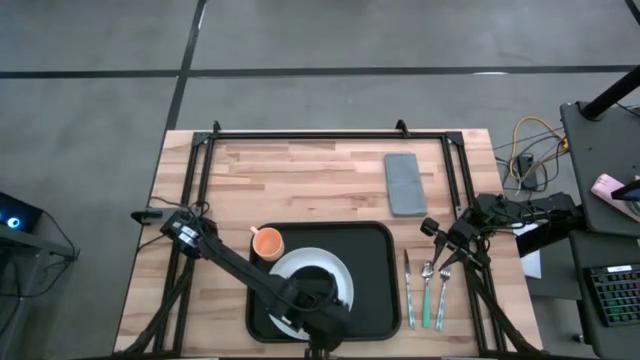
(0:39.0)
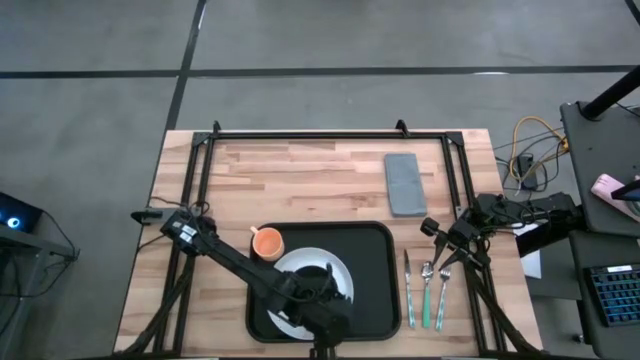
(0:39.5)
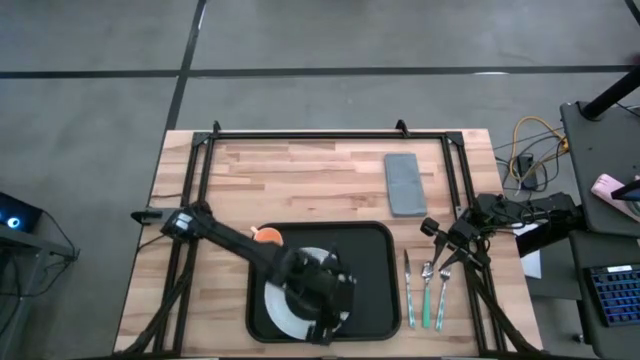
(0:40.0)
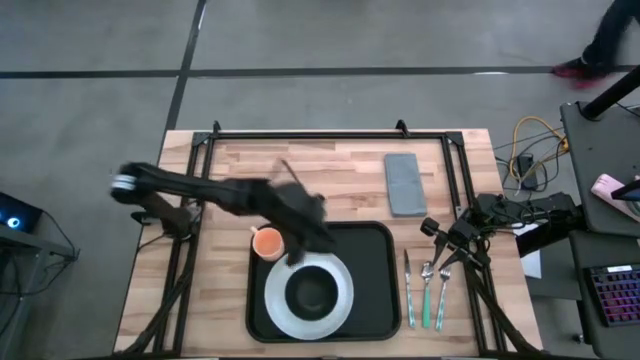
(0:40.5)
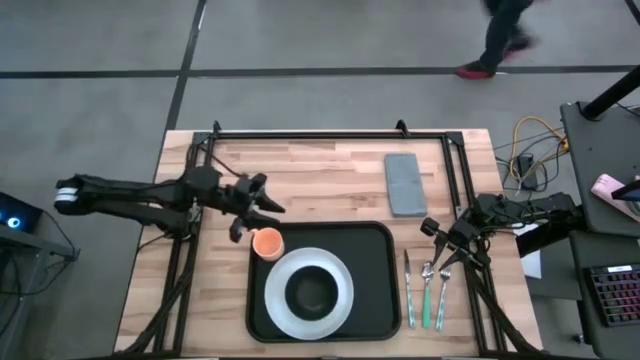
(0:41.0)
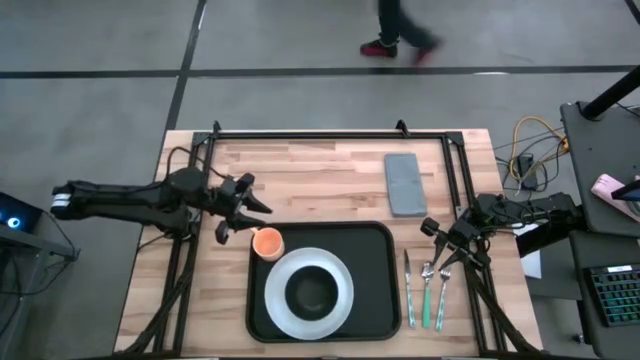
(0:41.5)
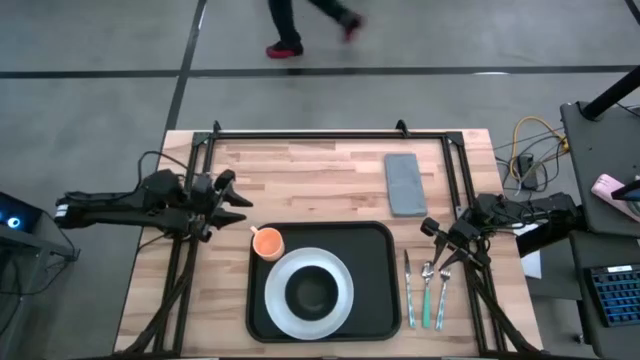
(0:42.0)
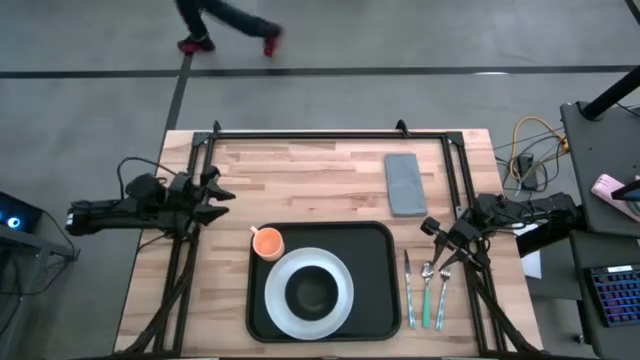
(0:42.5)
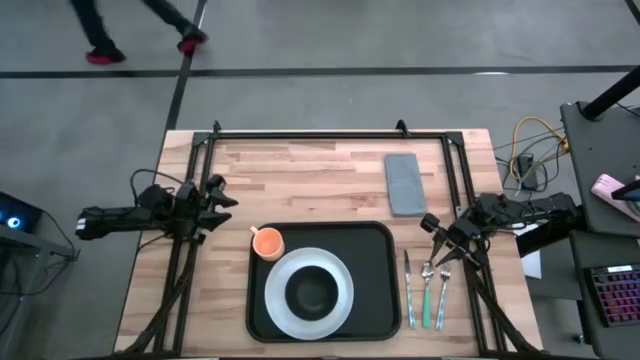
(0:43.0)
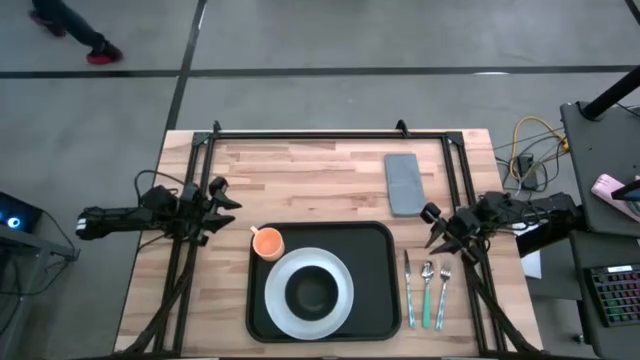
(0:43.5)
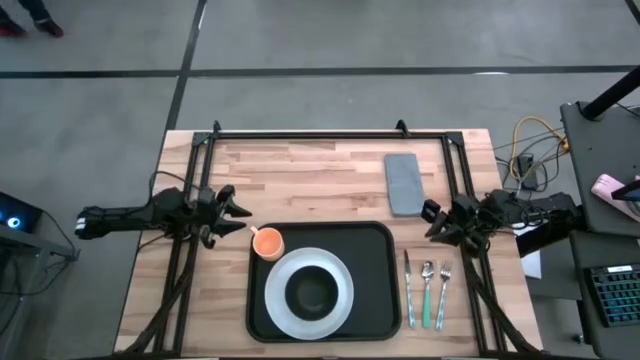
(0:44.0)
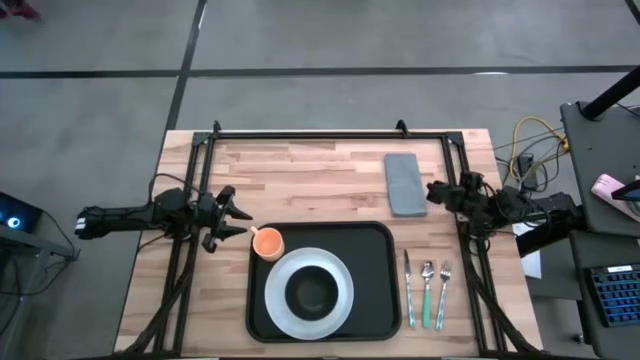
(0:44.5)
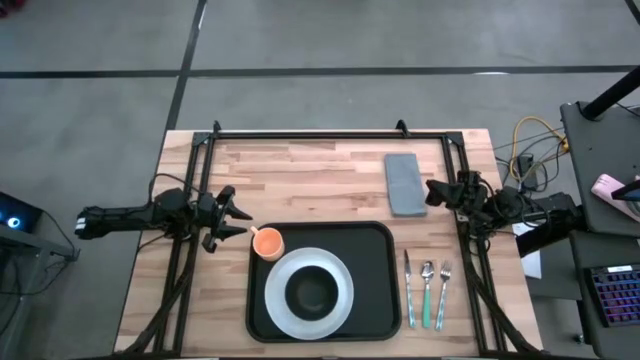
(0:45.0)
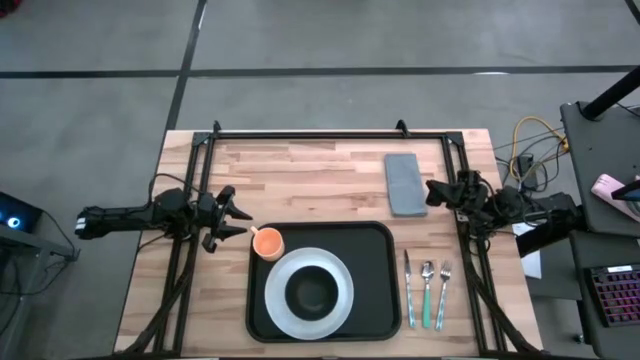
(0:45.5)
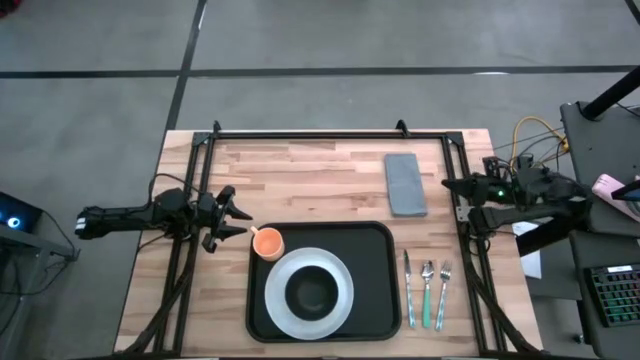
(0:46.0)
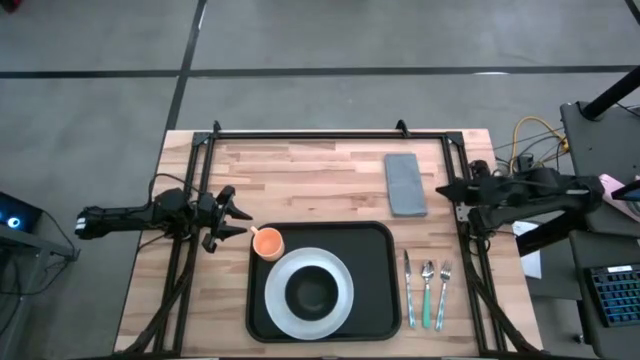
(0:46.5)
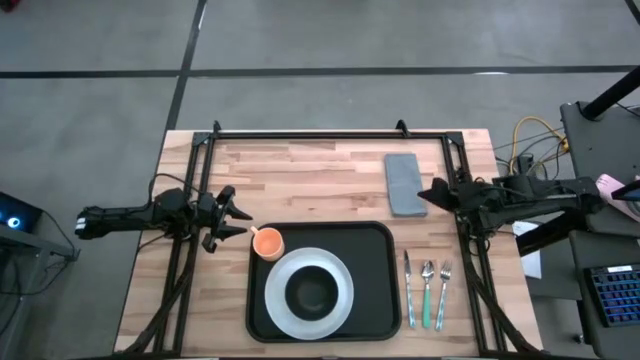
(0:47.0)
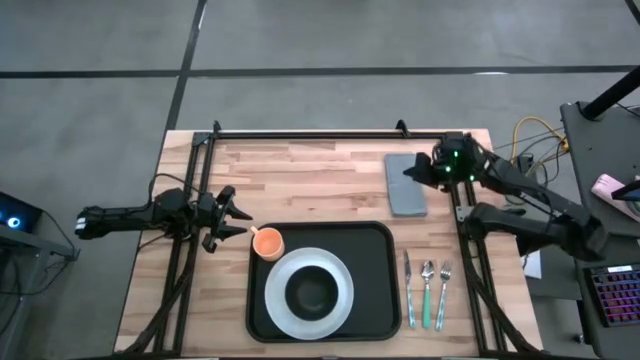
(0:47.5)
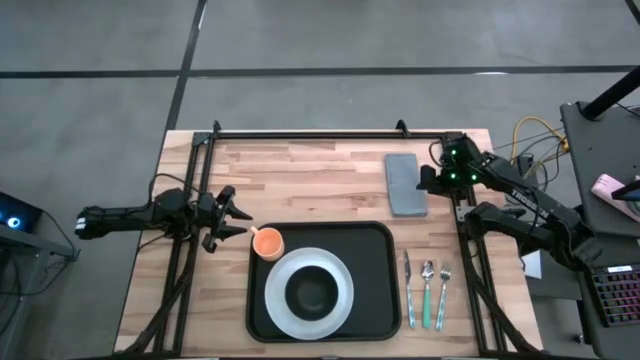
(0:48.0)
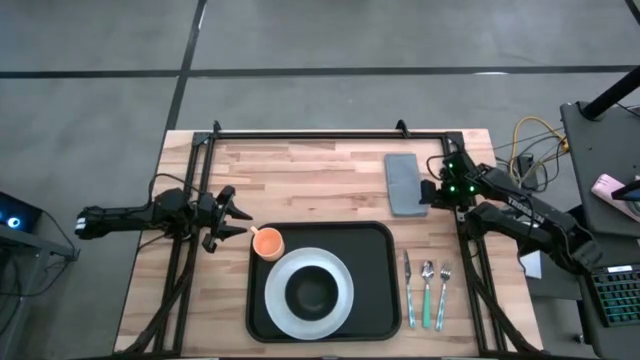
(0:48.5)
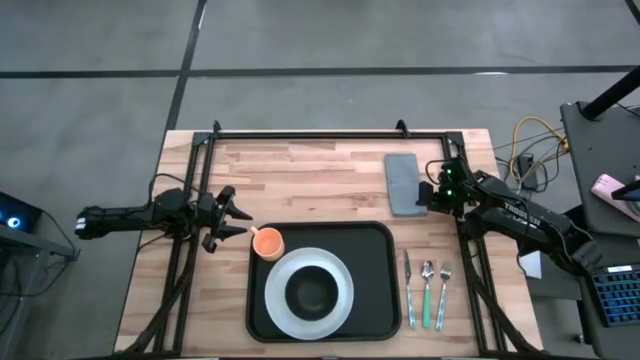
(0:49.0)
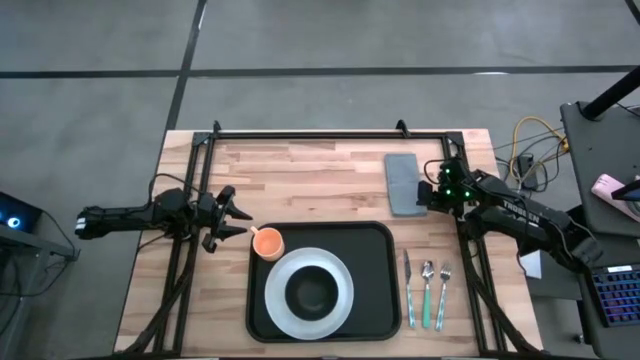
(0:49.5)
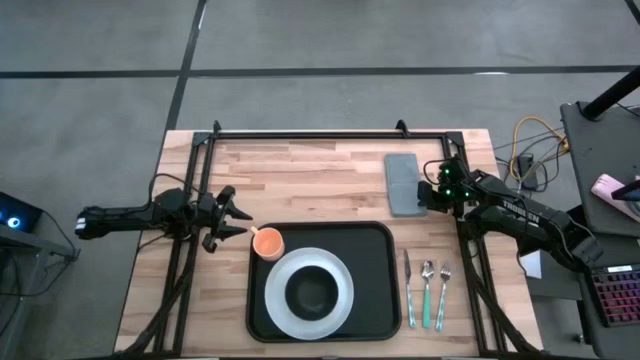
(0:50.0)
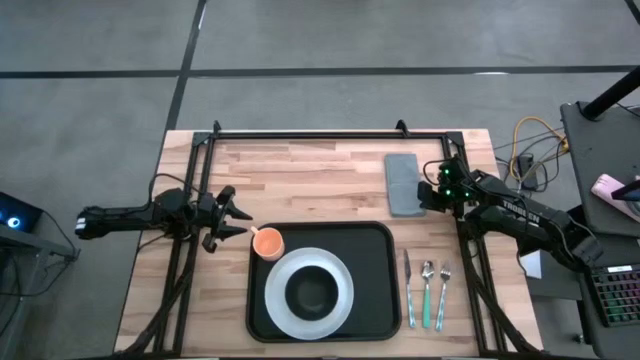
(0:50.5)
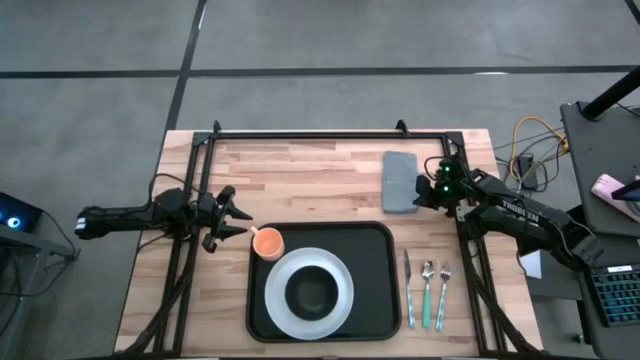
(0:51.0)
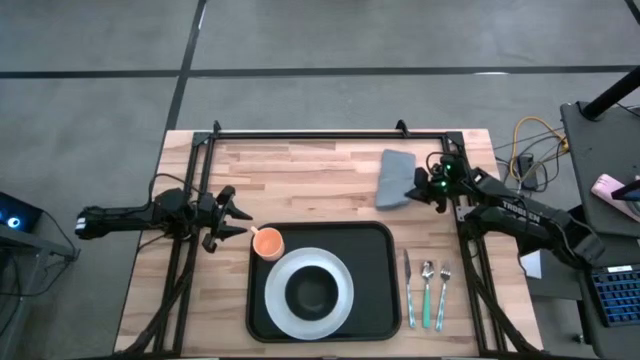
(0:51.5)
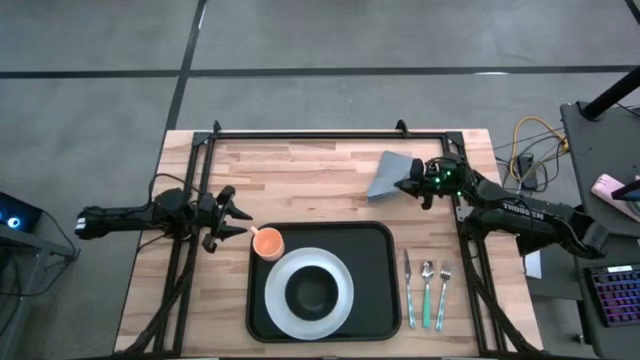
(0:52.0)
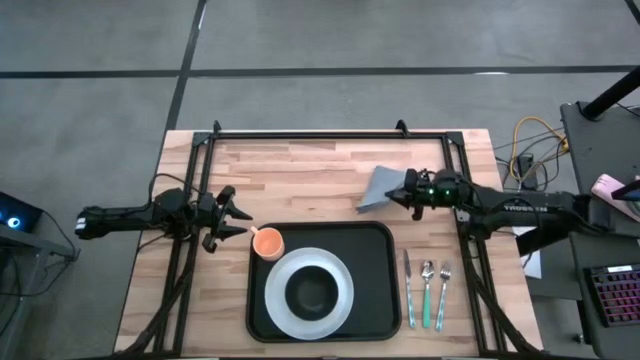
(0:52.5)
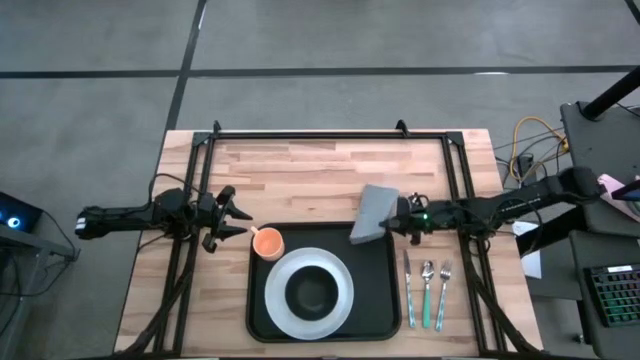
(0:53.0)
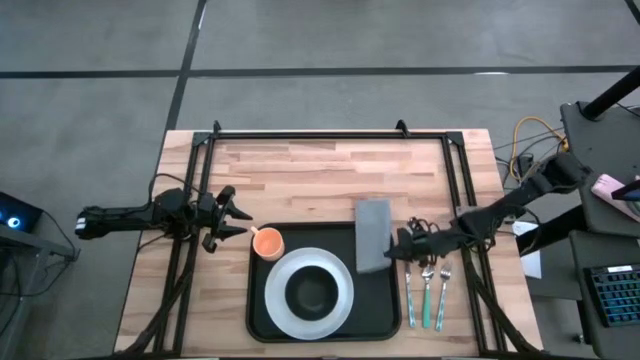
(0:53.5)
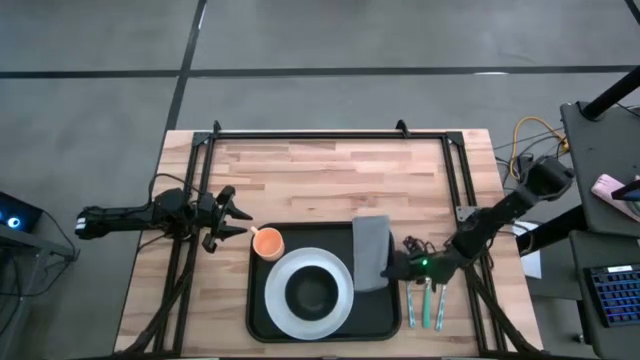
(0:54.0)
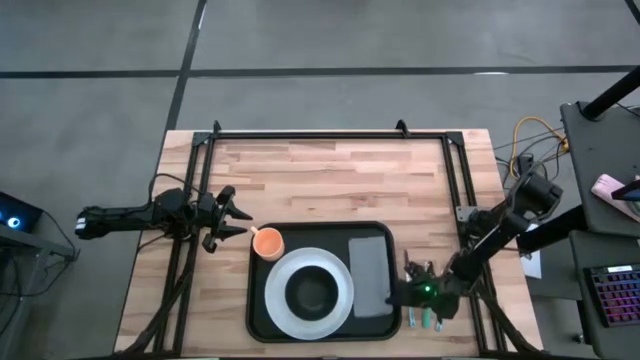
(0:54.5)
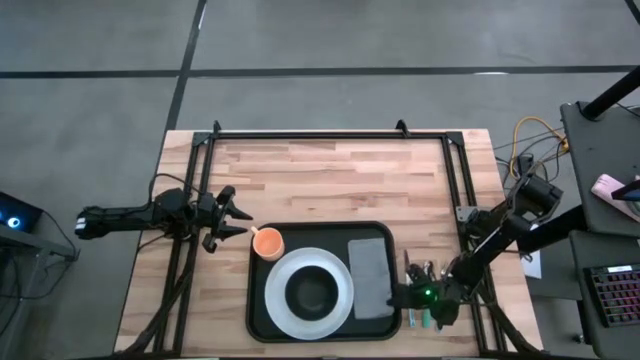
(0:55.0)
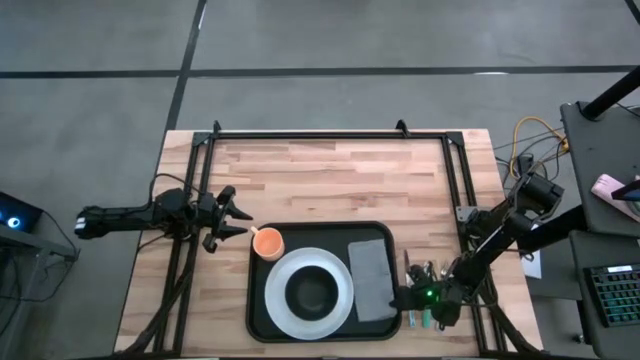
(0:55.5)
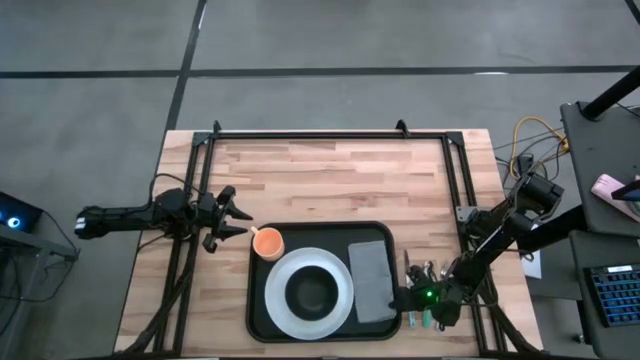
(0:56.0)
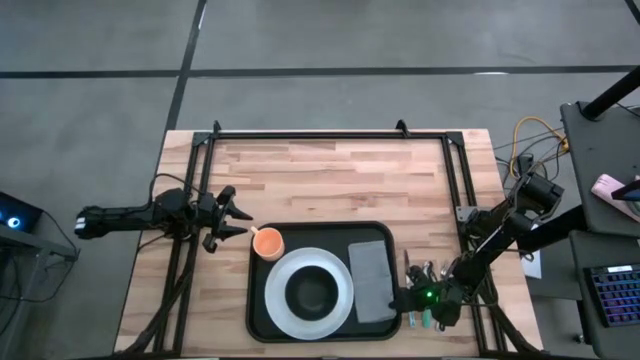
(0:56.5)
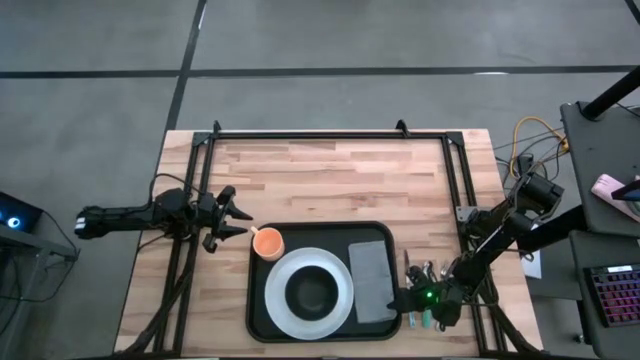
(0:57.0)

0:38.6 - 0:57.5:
Task: Set up tray
Put the gray napkin to the right of the white plate on the black tray

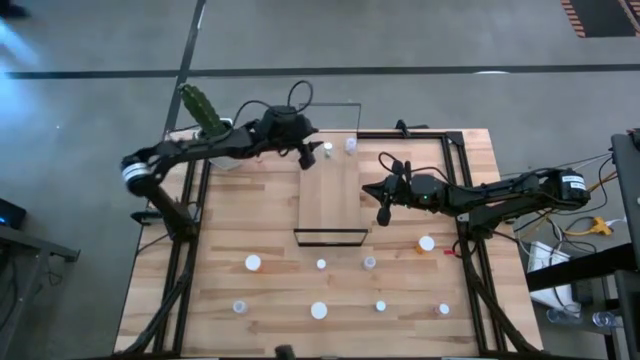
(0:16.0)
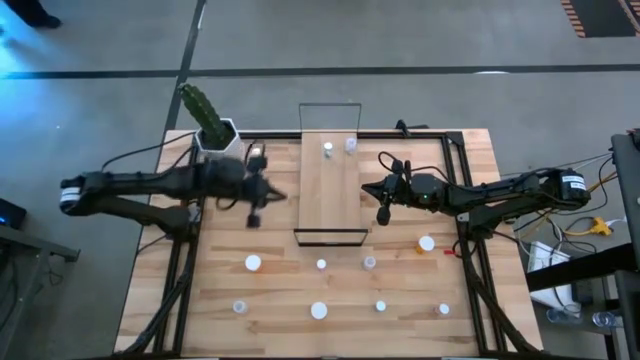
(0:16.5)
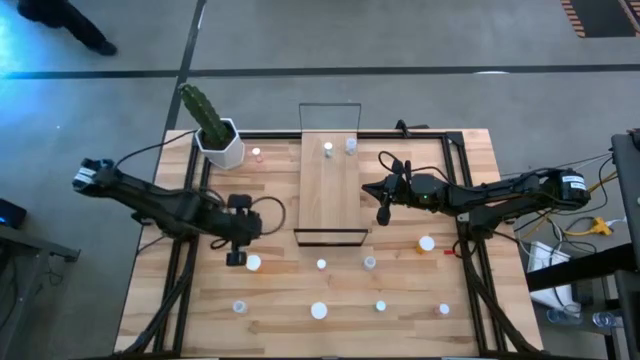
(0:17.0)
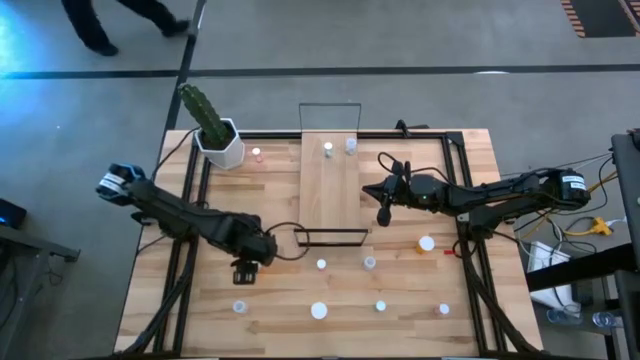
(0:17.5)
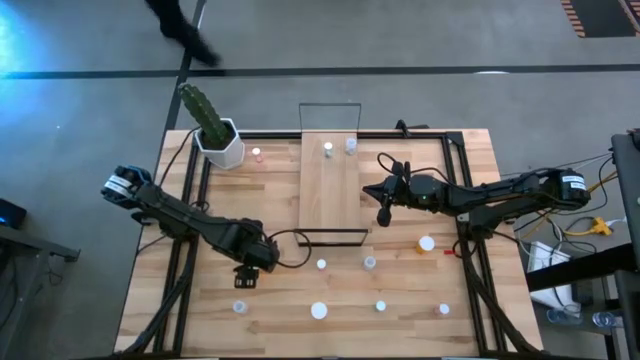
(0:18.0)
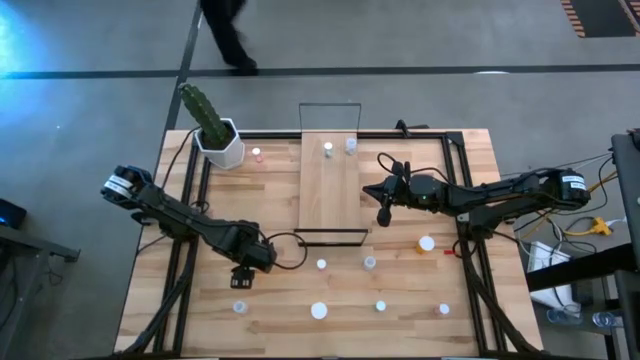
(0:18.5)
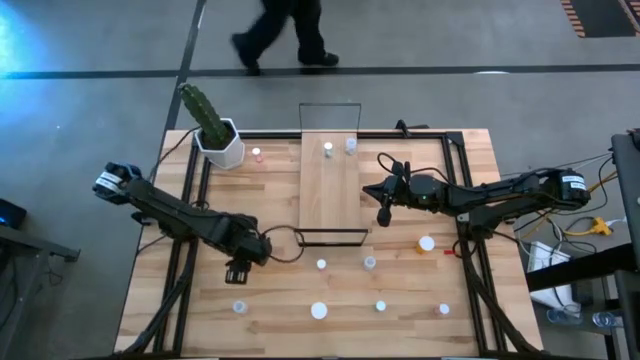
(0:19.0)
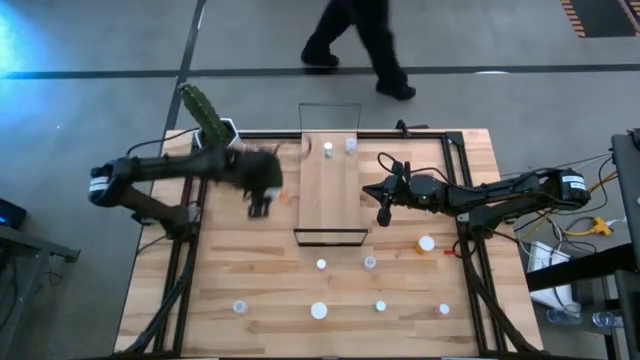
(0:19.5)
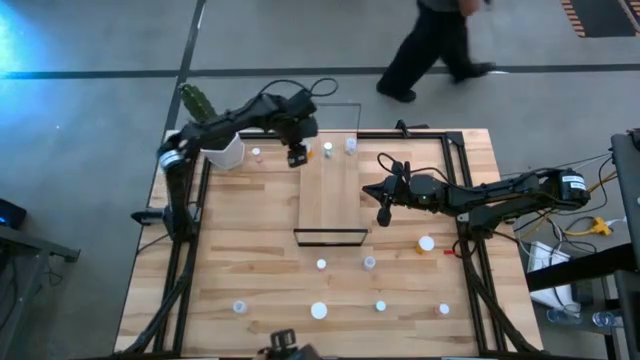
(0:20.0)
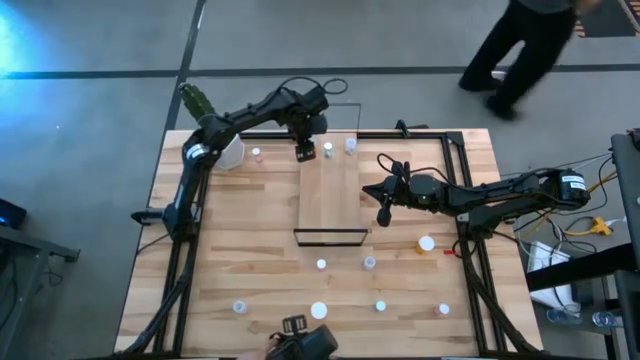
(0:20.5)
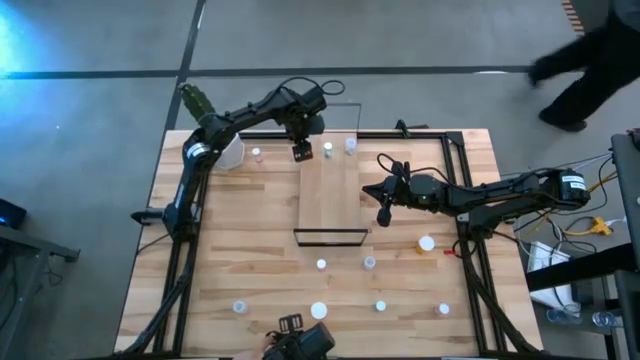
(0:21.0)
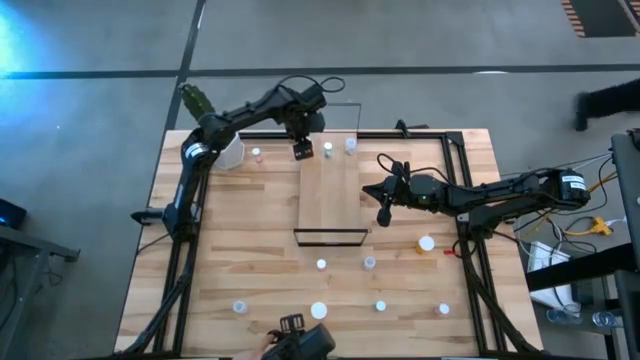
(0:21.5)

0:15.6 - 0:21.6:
Task: Pick and place medicine bottles onto shelf by color
Put the left transparent yellow pill bottle on the shelf
